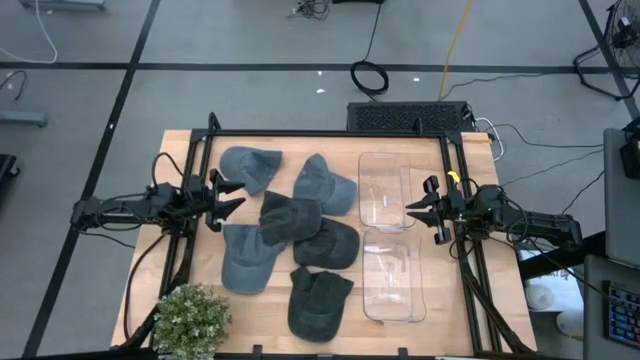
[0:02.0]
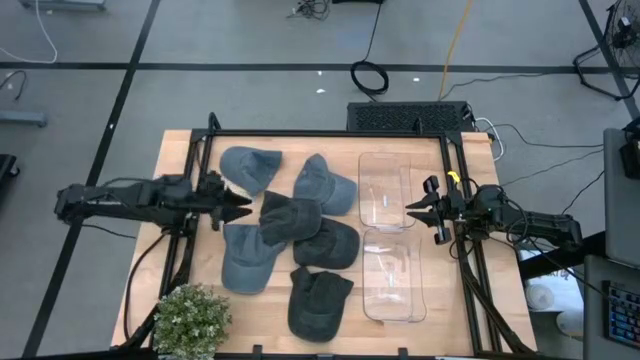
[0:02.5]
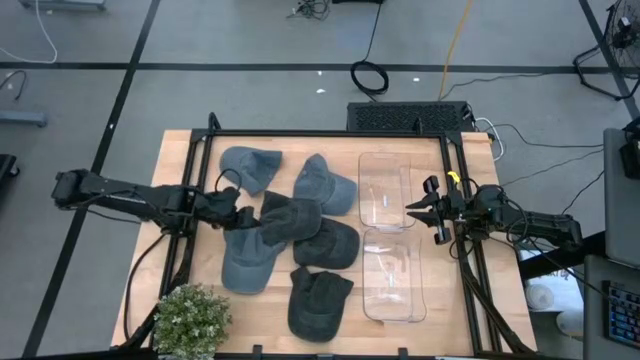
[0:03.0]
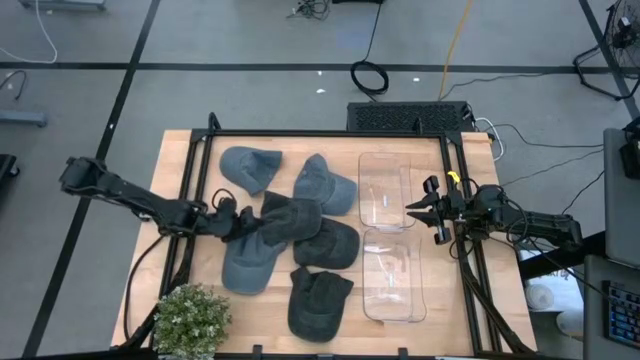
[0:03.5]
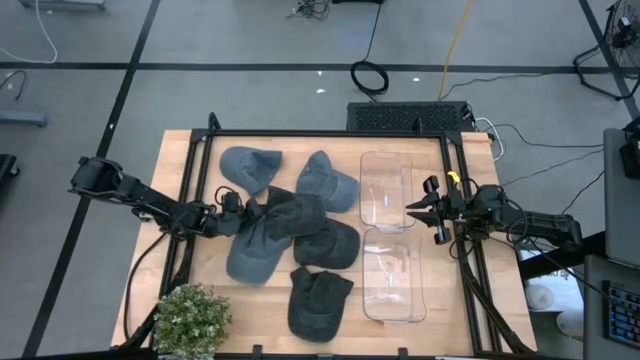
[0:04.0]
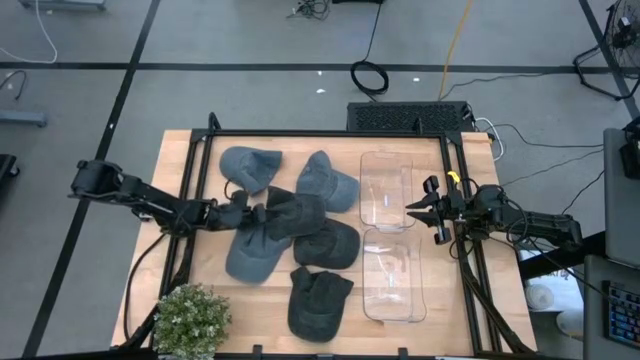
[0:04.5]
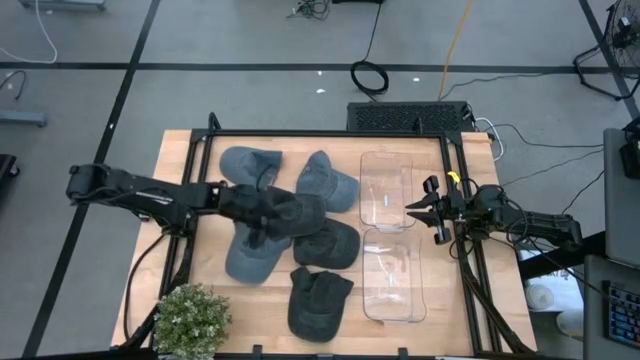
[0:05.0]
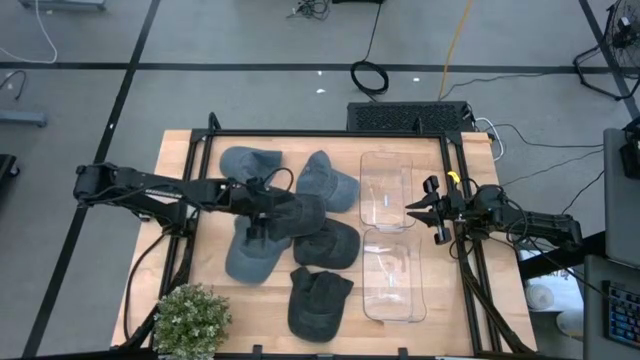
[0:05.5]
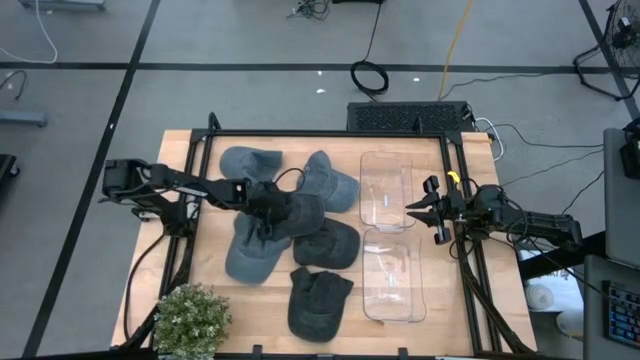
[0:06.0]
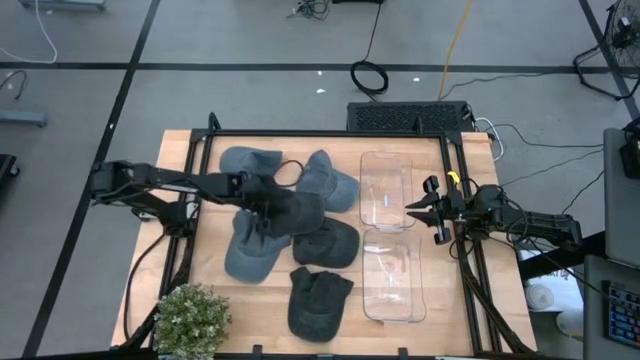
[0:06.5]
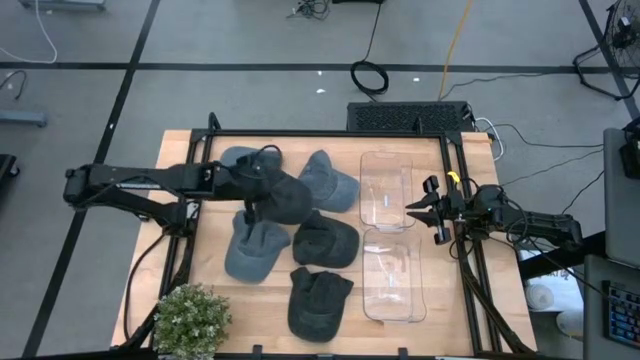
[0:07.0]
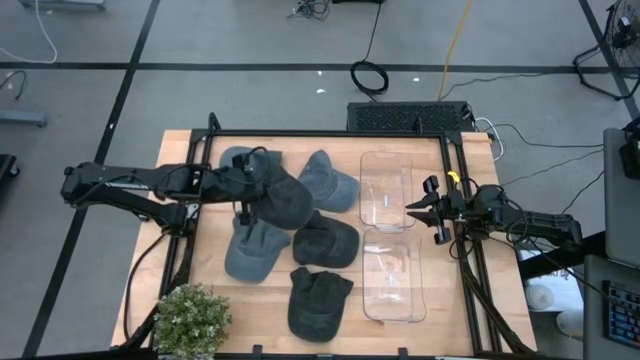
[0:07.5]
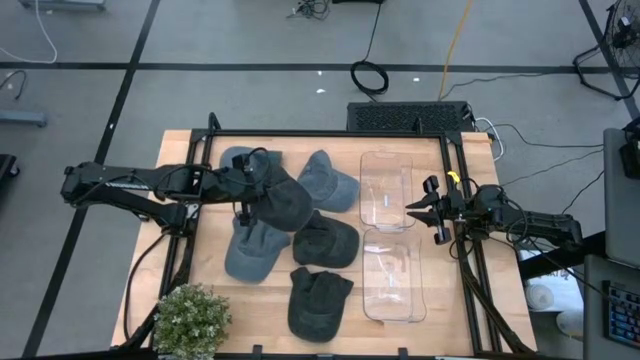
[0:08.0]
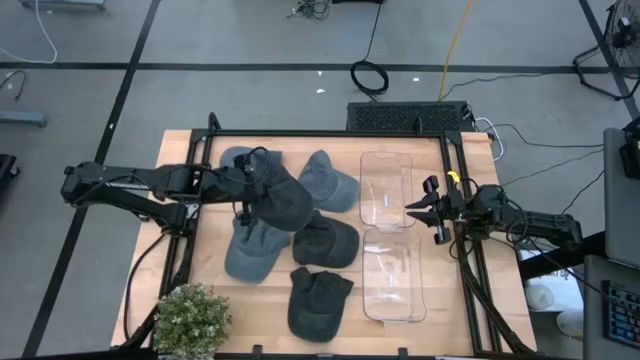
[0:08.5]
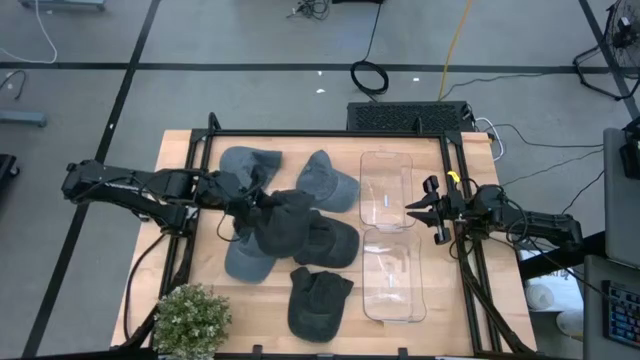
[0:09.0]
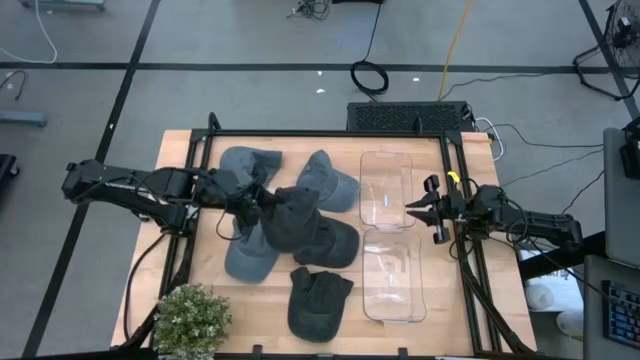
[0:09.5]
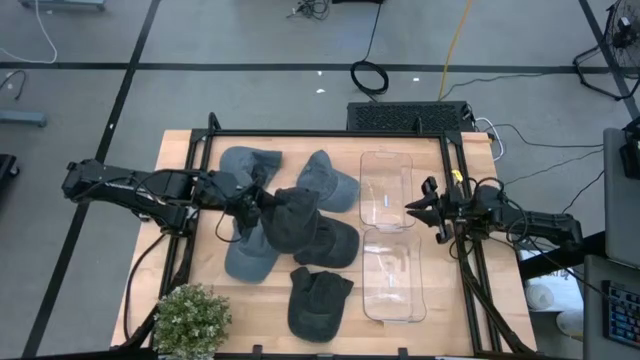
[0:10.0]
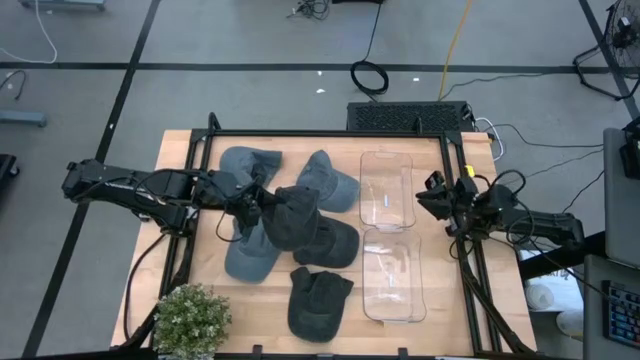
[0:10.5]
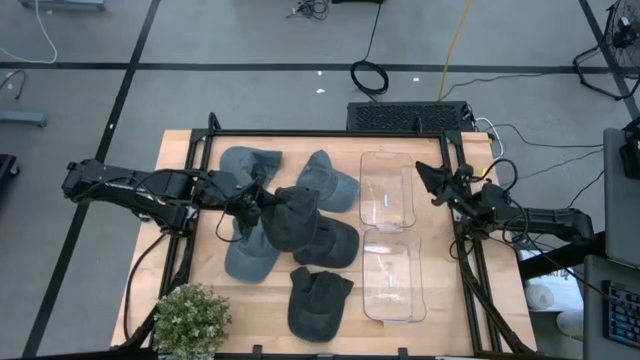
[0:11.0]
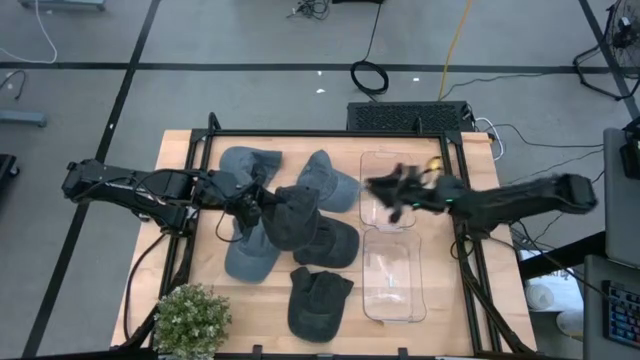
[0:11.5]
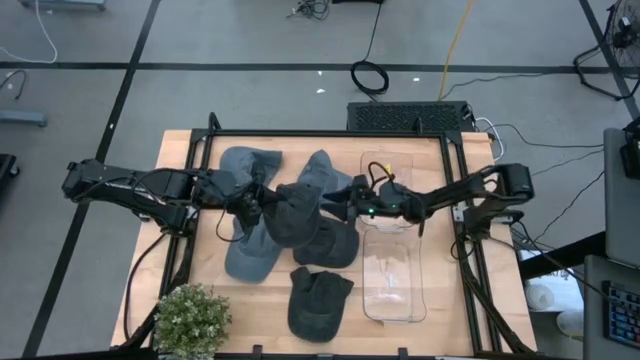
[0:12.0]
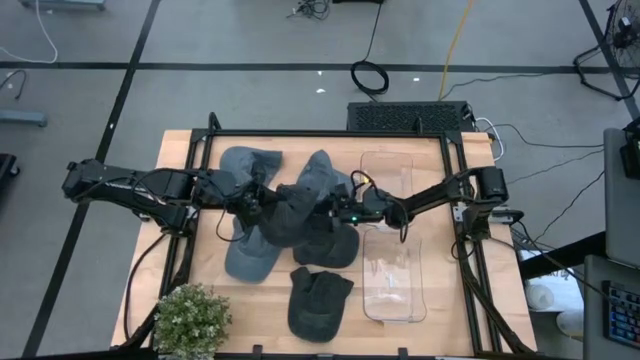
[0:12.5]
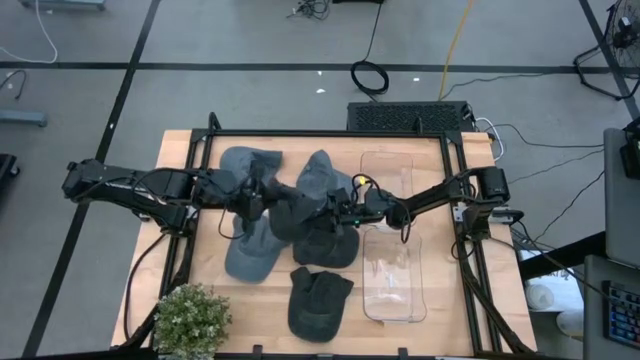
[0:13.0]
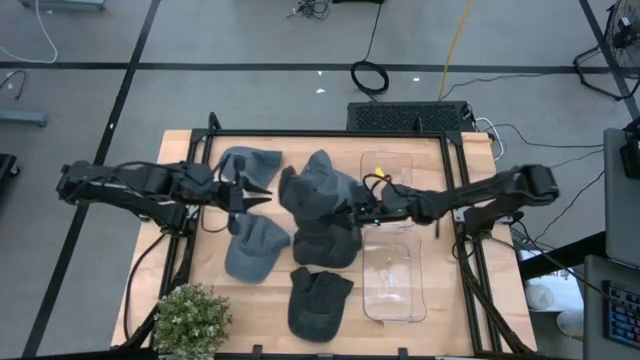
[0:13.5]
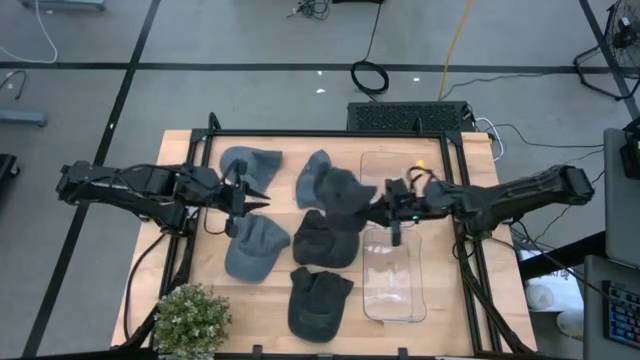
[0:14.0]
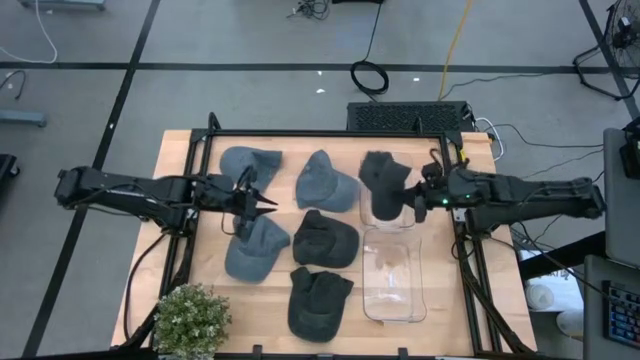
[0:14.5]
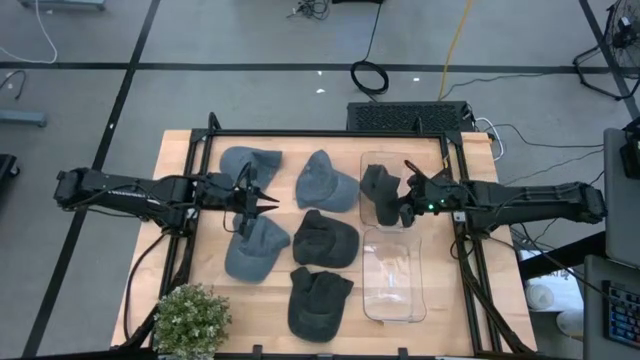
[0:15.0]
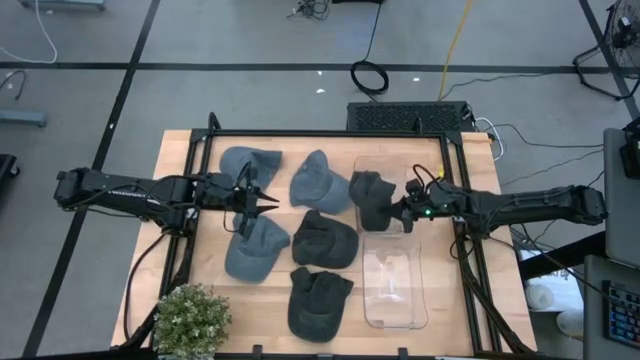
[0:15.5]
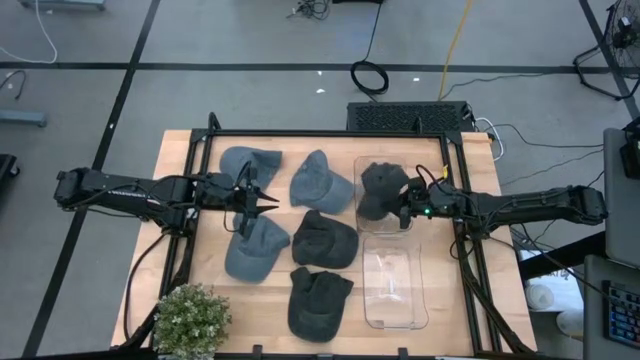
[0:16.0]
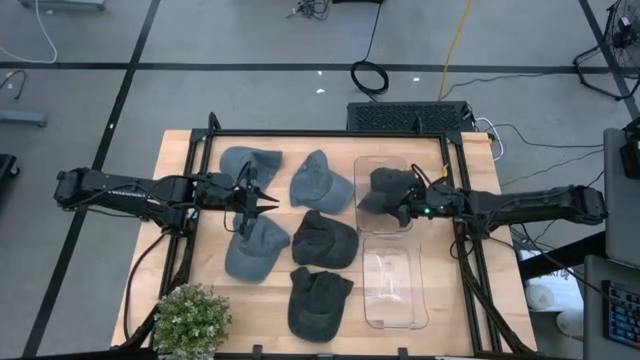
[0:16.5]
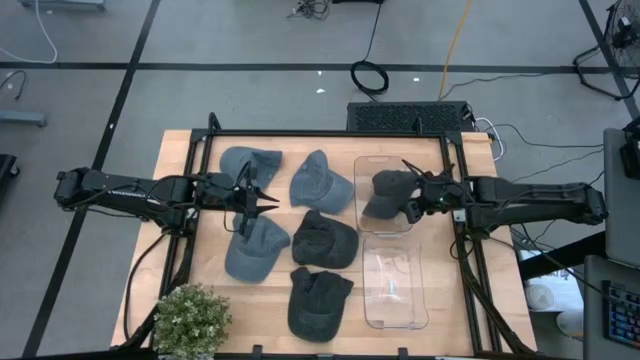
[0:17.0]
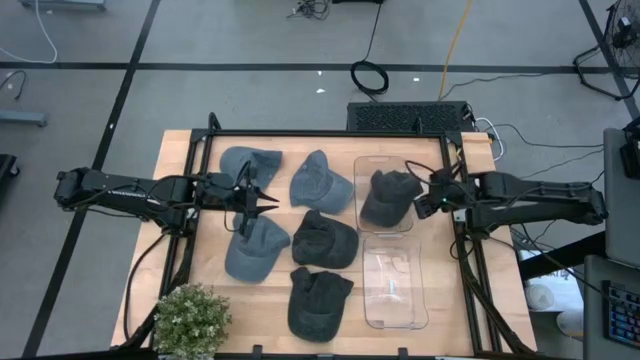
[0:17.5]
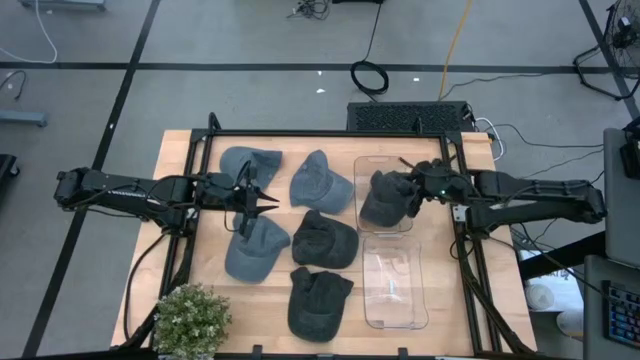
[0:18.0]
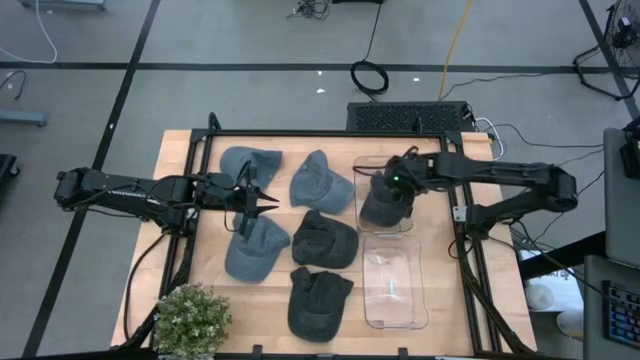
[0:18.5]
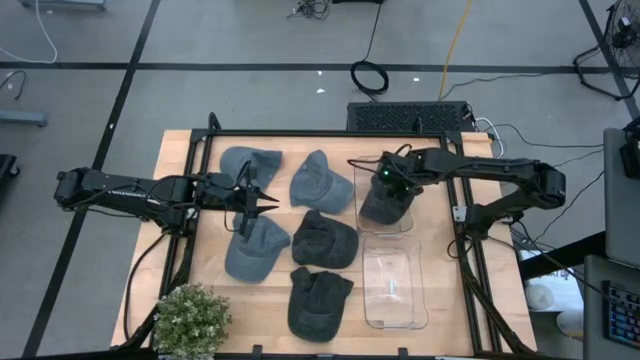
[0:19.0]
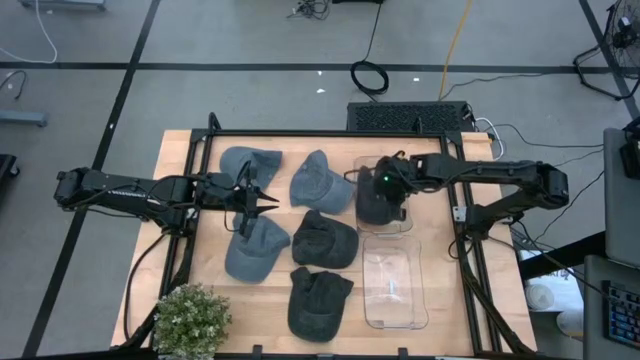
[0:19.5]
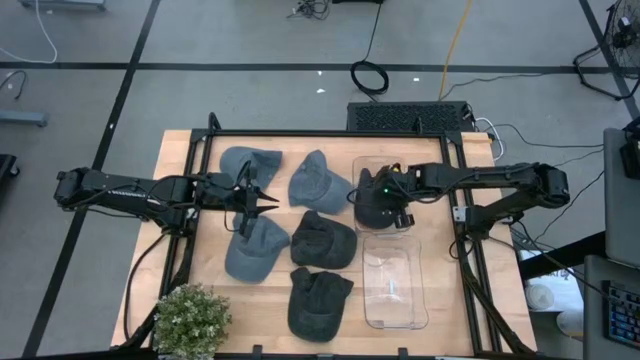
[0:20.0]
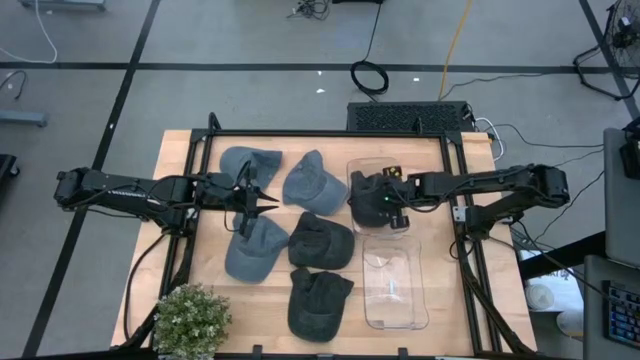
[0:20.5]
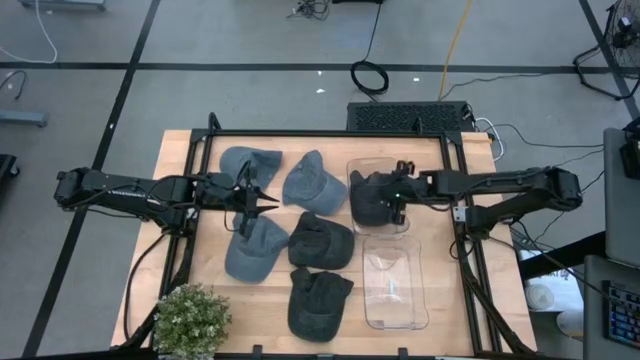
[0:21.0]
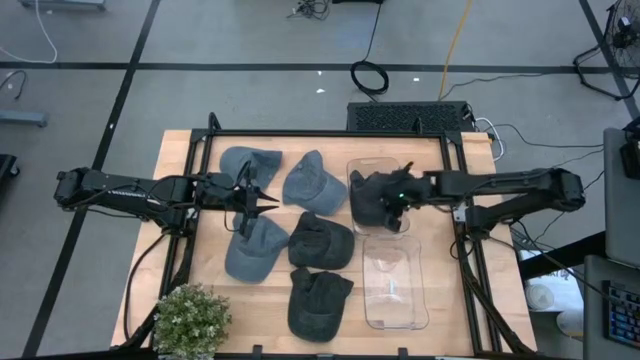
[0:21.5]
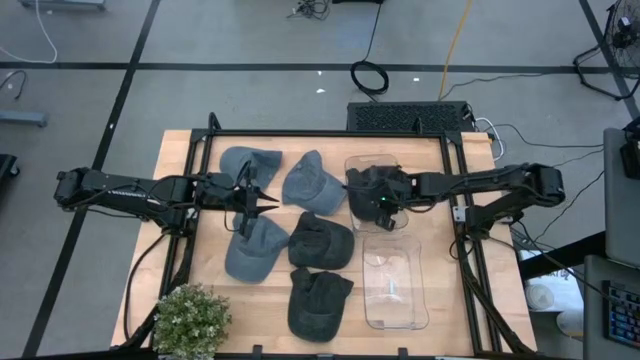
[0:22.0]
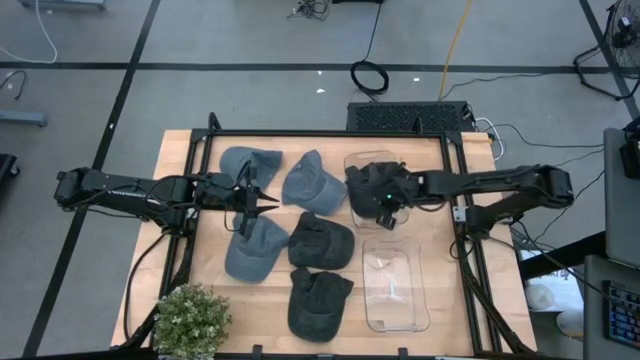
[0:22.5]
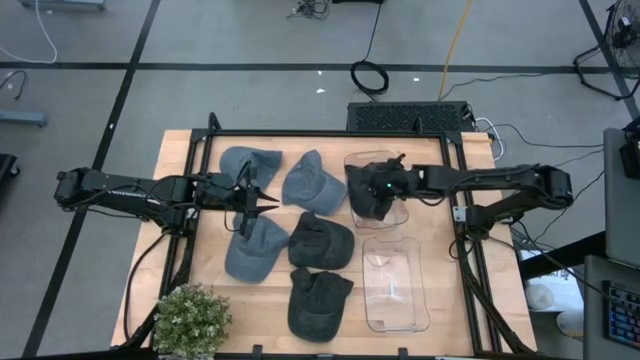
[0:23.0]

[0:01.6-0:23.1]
Task: Pick & Place hat
Put the left black cap into the top transparent bin
